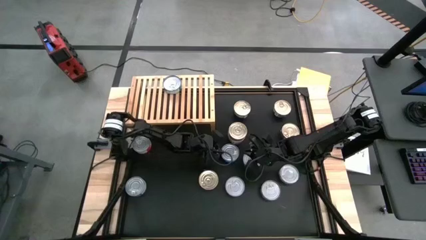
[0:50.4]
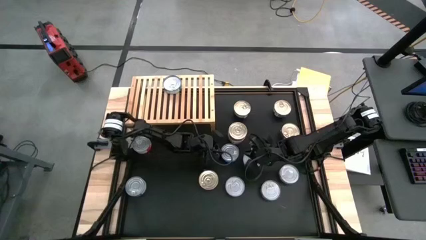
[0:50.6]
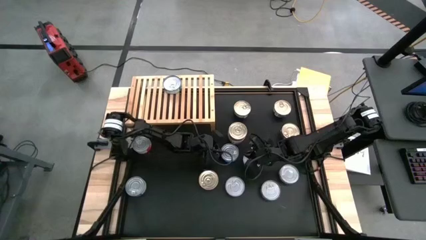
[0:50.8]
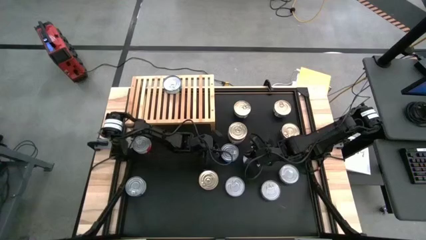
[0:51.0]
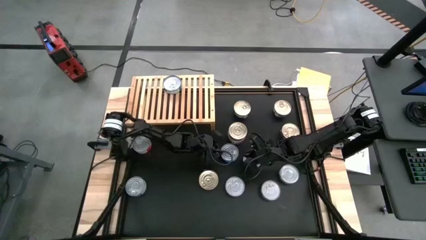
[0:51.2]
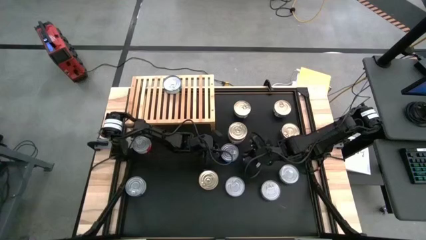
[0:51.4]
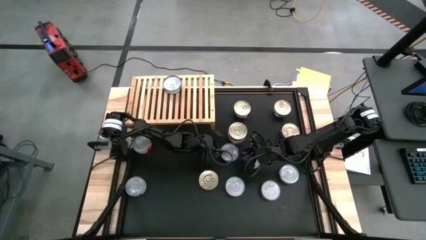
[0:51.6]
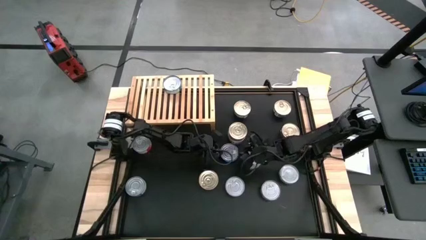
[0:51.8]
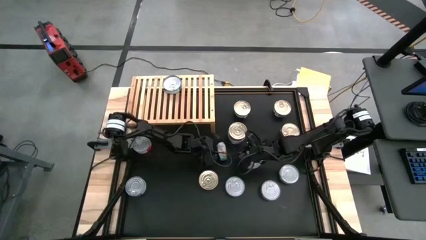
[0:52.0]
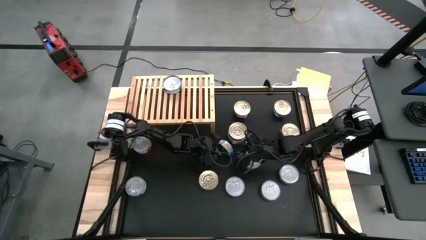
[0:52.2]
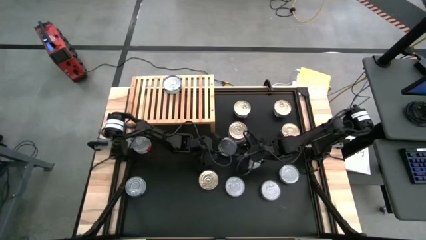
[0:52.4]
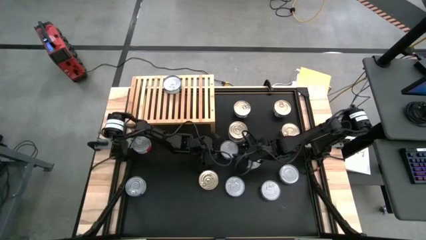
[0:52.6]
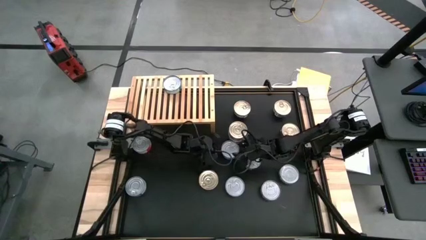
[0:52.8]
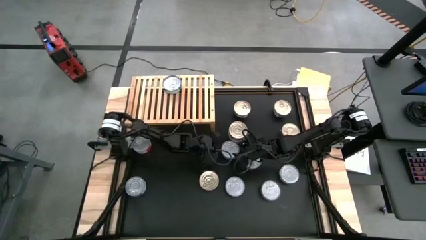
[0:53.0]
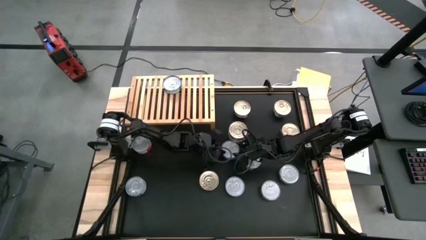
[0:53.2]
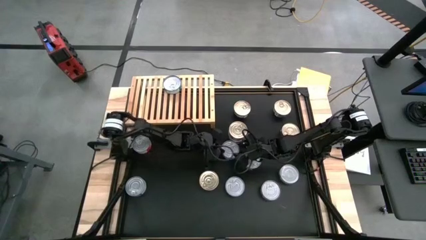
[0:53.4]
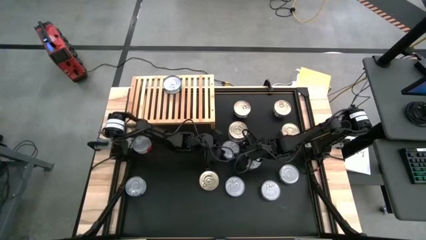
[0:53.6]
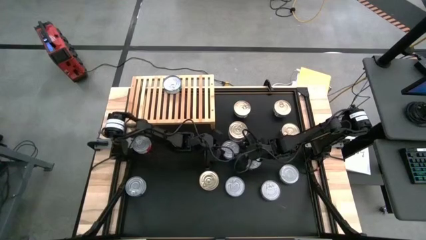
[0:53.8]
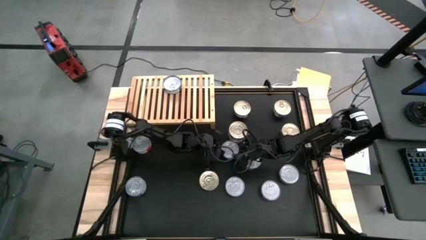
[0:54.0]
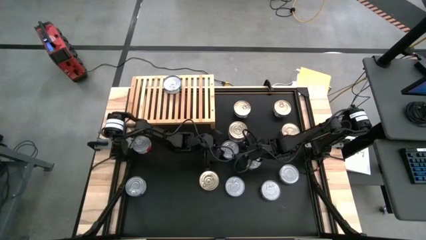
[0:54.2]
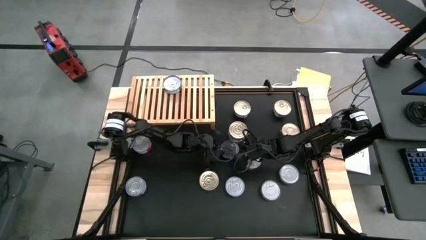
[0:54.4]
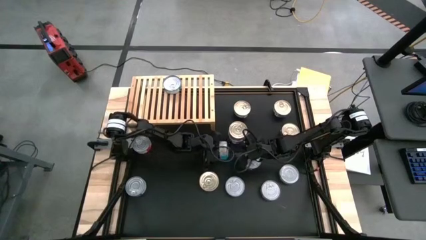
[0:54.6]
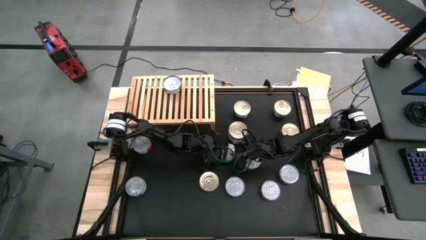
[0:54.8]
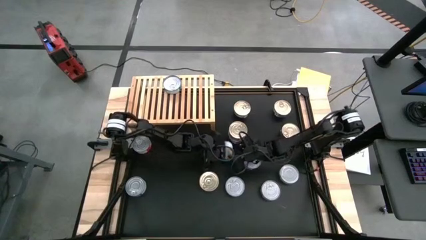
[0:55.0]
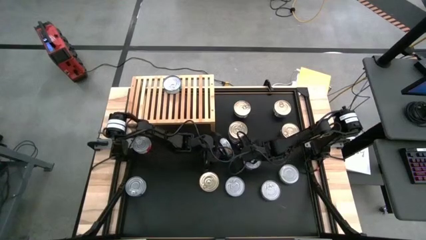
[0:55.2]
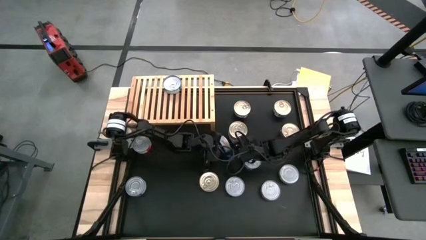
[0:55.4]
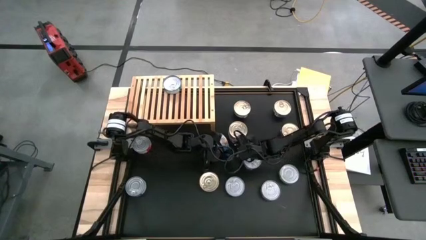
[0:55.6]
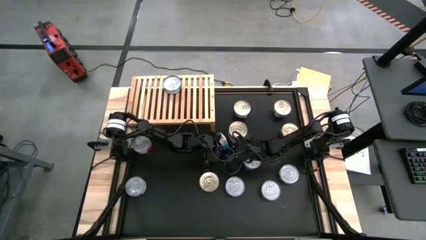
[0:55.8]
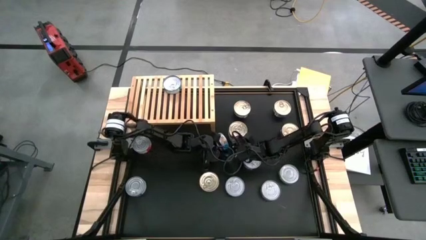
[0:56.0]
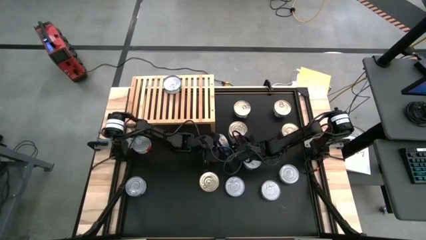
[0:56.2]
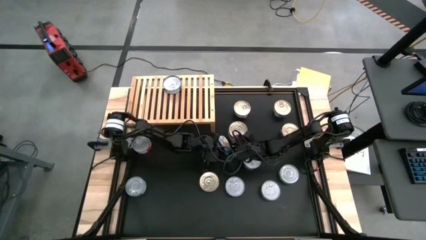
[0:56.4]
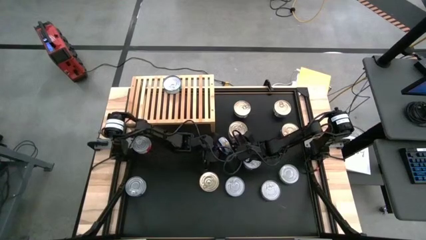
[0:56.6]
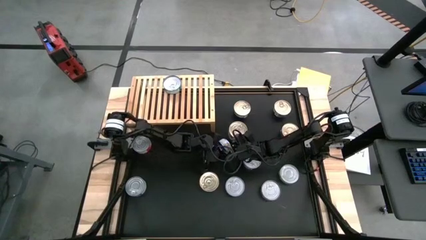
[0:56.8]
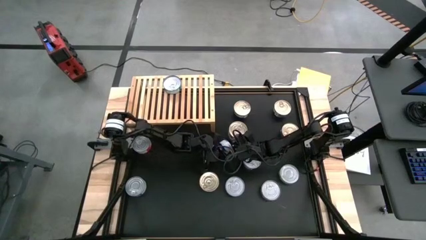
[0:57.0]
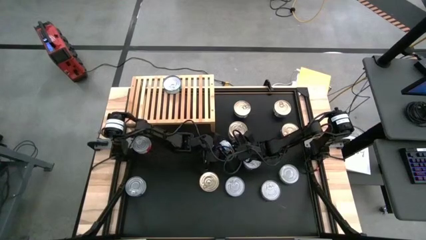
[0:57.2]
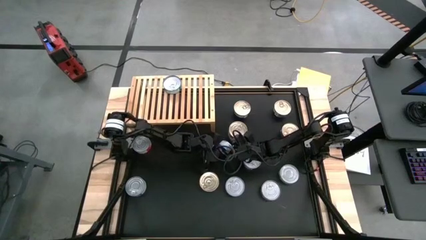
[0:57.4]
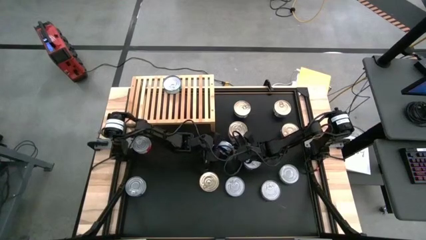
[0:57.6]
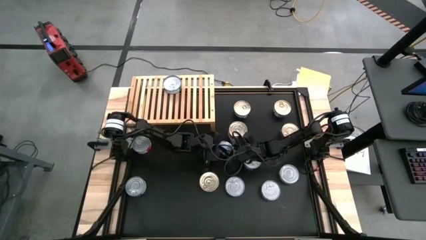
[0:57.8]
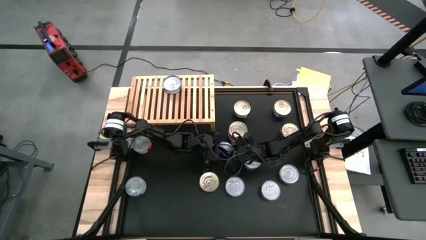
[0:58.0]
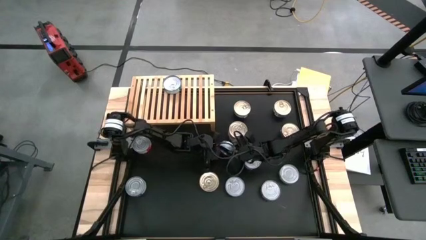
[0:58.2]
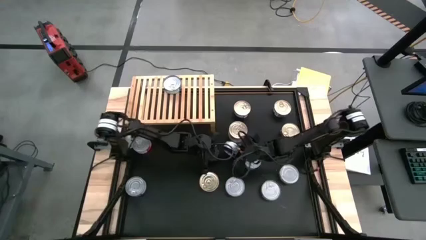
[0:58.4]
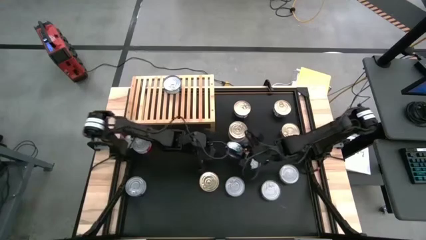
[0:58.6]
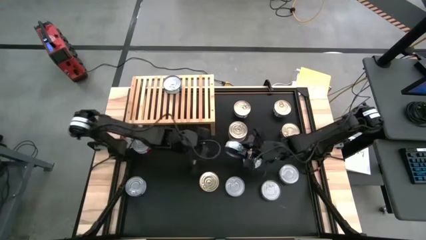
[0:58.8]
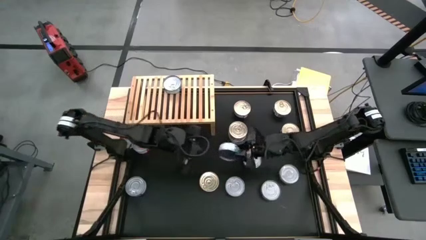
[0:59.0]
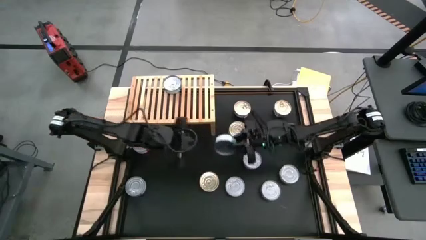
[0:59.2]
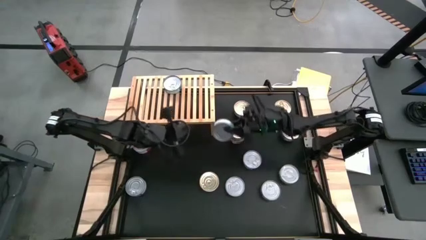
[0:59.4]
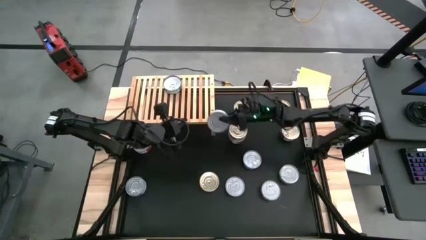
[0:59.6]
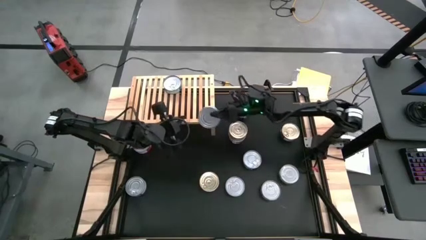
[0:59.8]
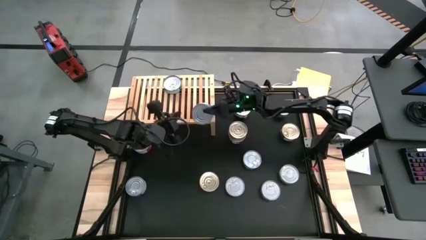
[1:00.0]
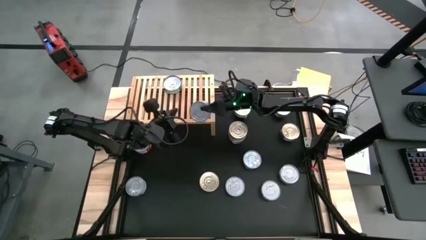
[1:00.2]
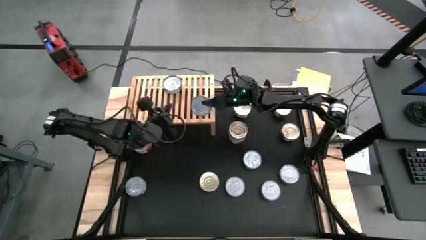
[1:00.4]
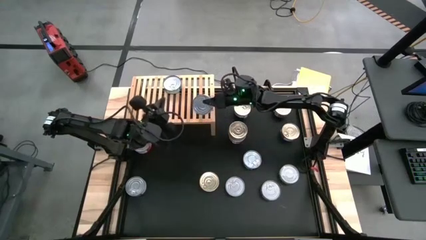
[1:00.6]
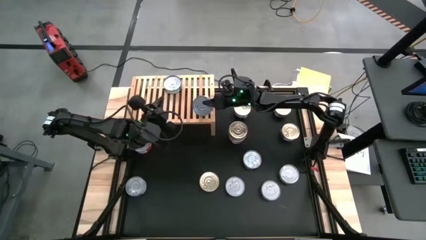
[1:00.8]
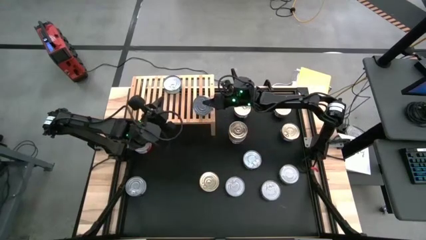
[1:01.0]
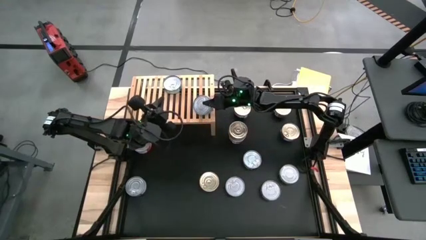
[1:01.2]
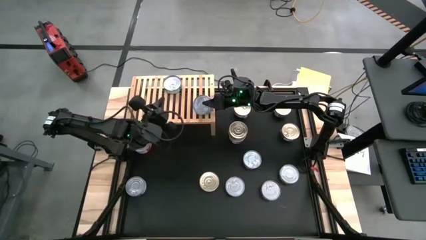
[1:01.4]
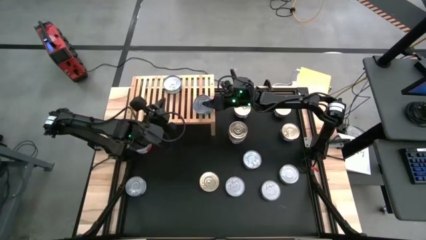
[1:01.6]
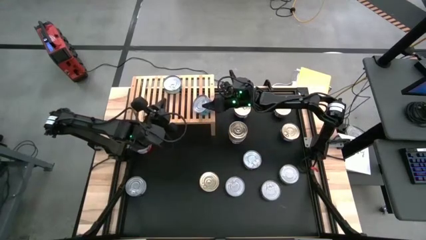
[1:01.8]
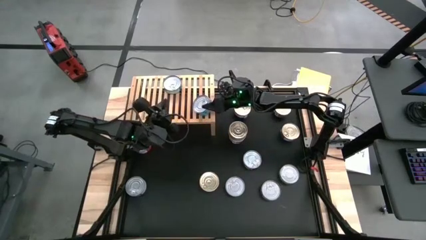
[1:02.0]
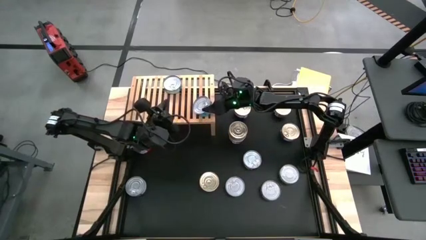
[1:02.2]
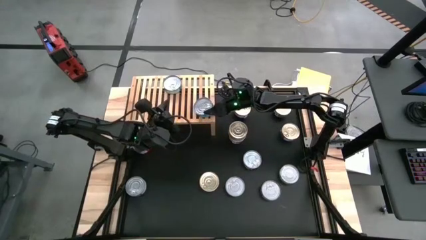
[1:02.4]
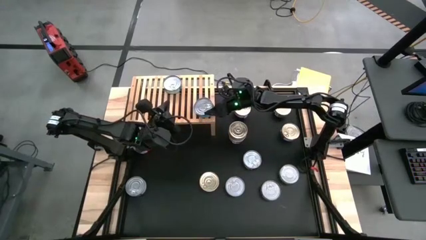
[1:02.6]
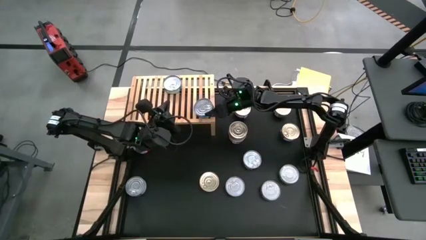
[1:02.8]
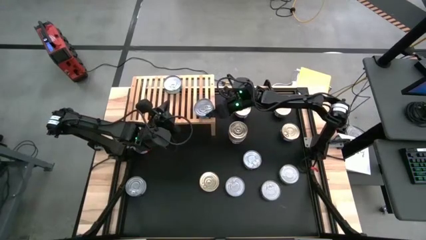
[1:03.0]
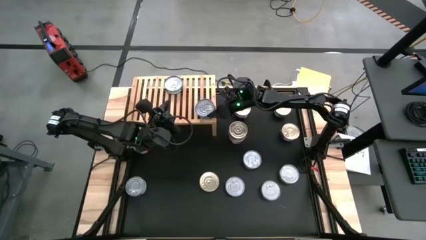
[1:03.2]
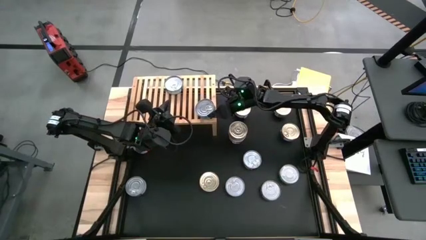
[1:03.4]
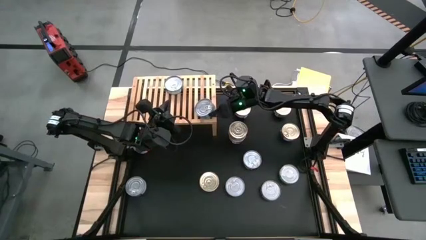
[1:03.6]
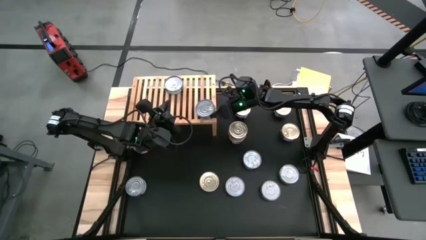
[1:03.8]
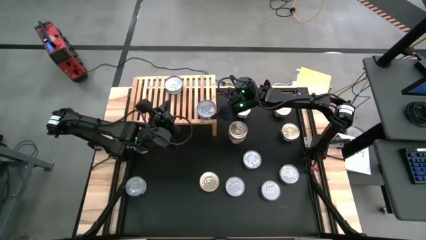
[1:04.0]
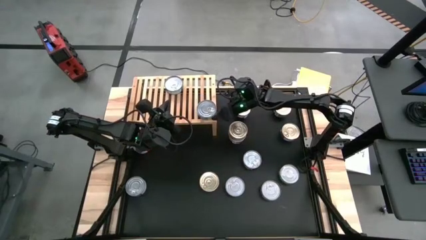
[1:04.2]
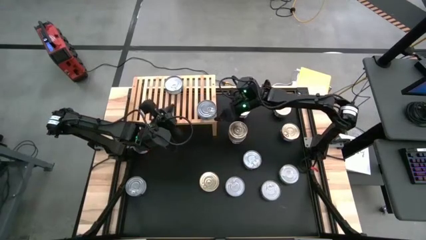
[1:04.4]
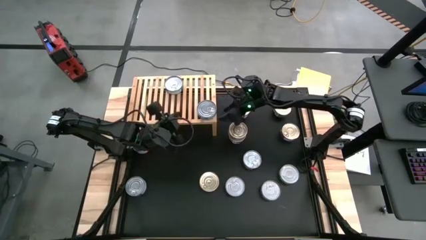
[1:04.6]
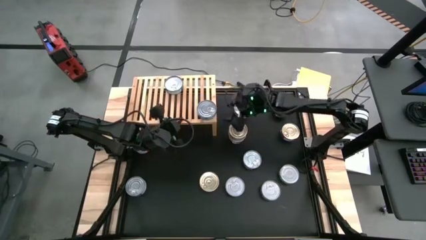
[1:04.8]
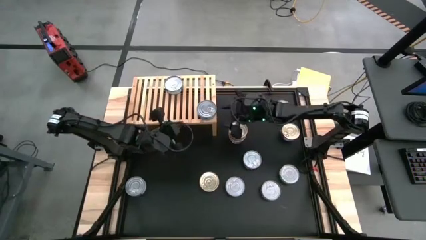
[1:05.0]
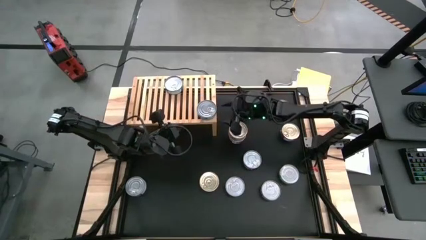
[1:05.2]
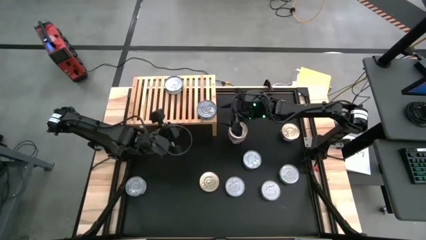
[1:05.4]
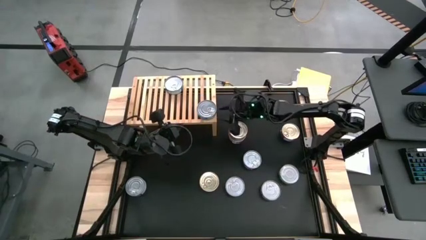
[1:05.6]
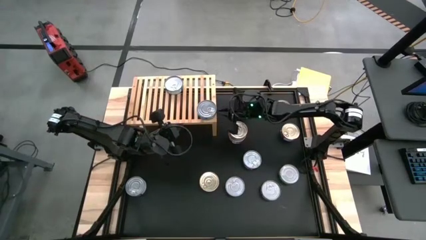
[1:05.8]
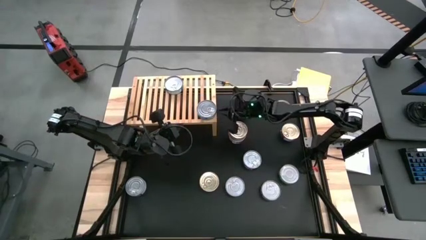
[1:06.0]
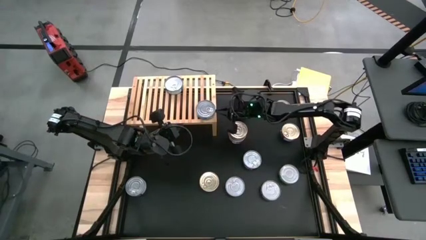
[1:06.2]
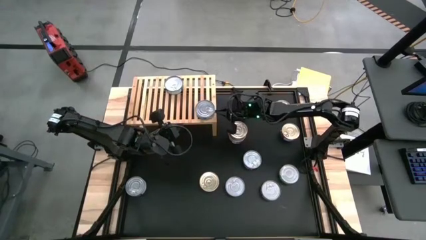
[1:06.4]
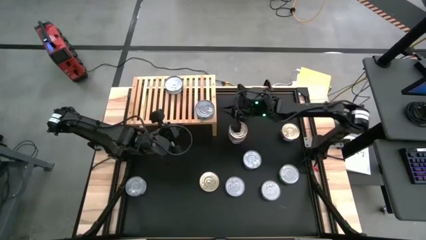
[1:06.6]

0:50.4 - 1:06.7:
Task: Stack canned seafood by type on shelf
Put the yellow blue tuna can on the shelf
